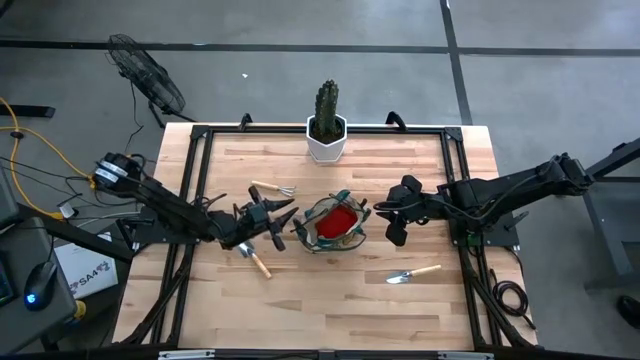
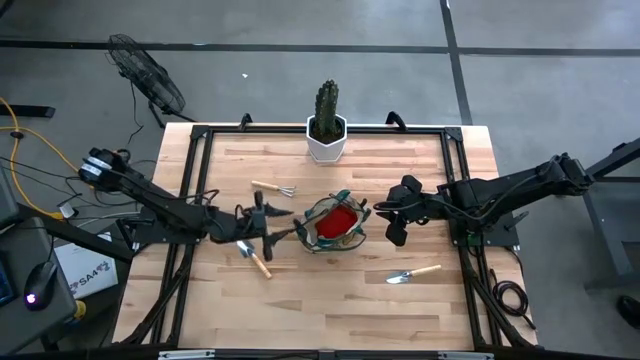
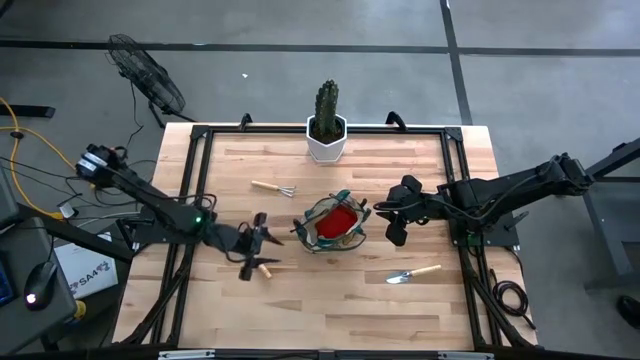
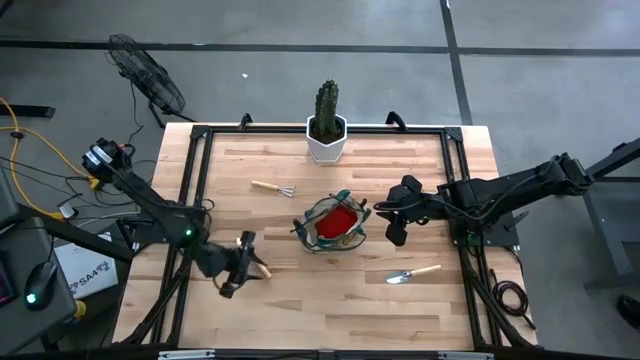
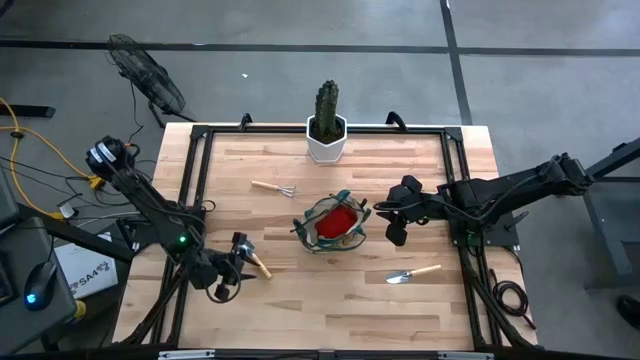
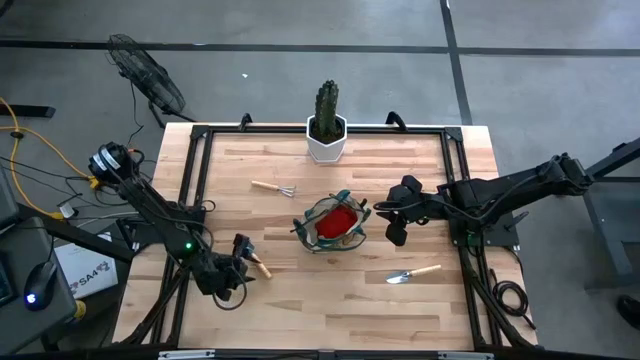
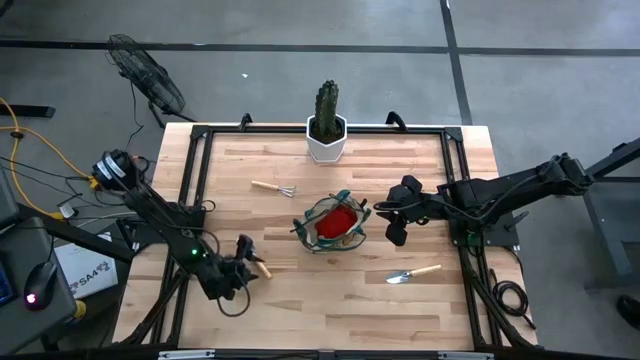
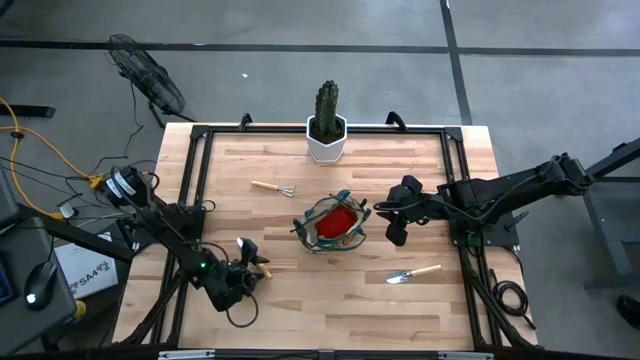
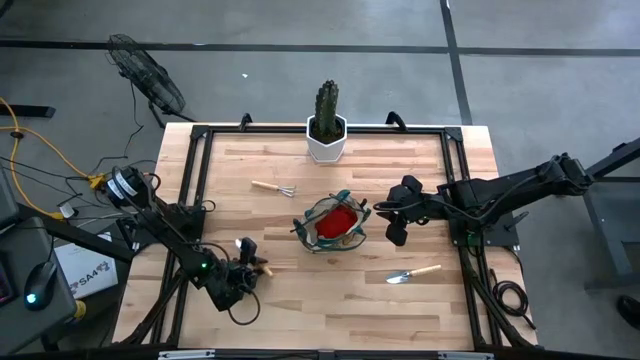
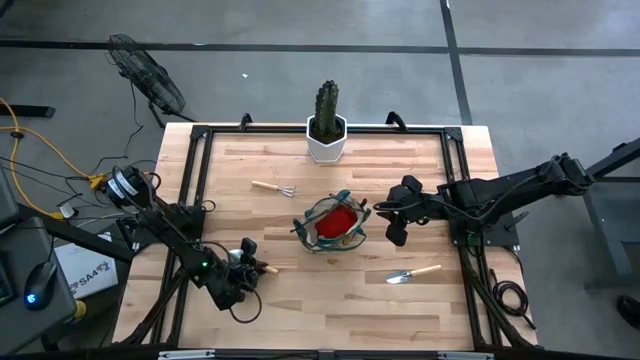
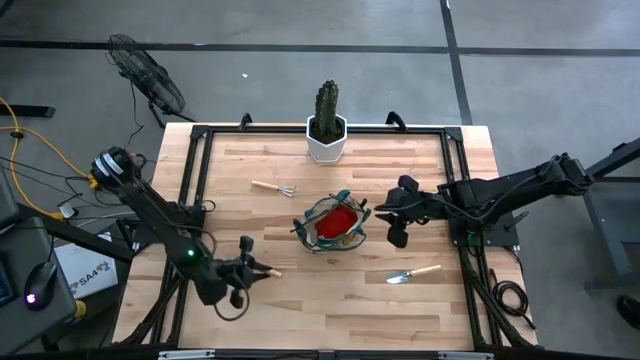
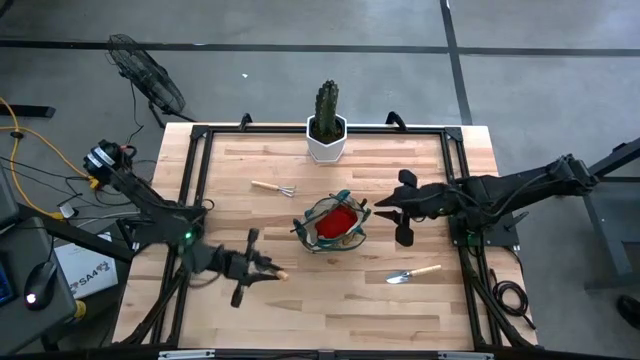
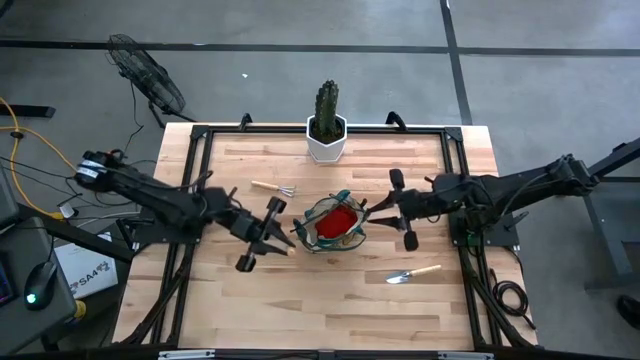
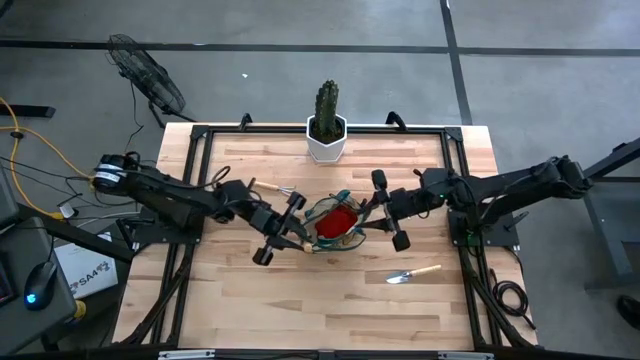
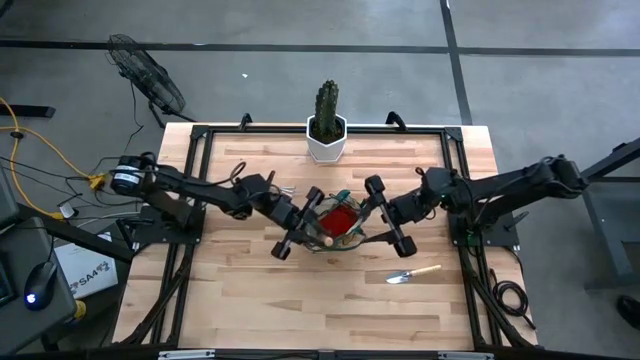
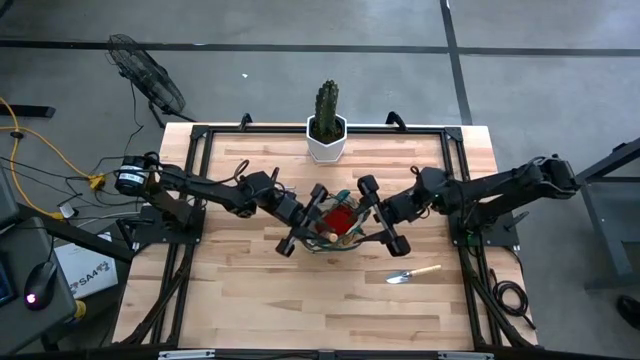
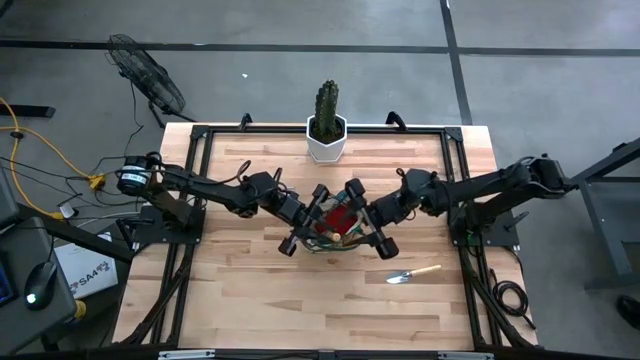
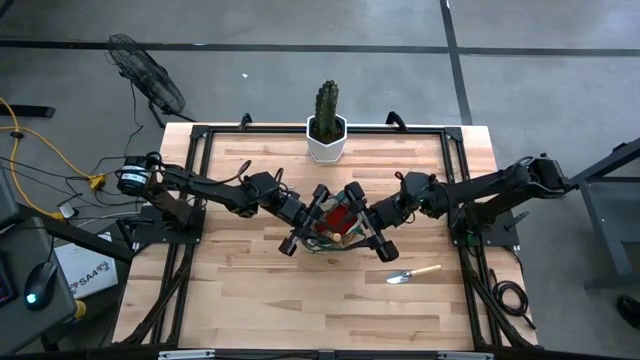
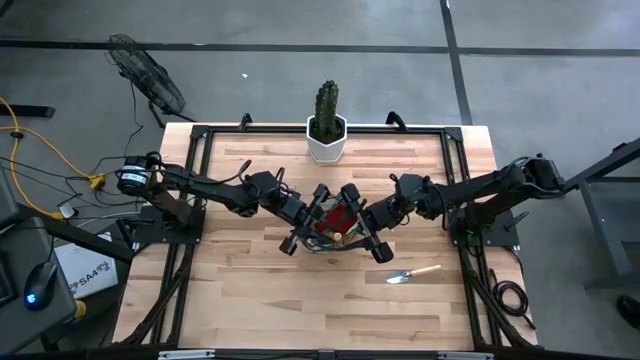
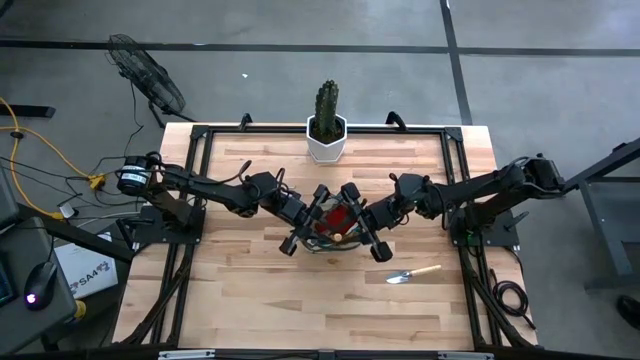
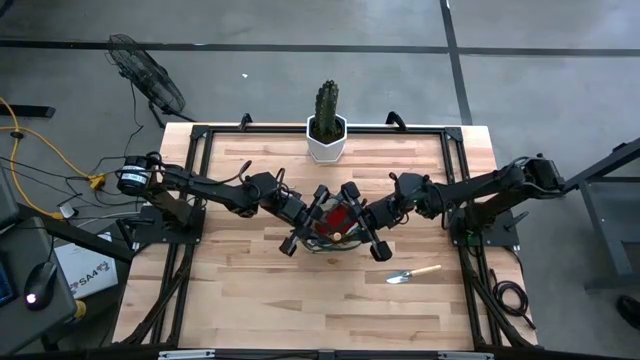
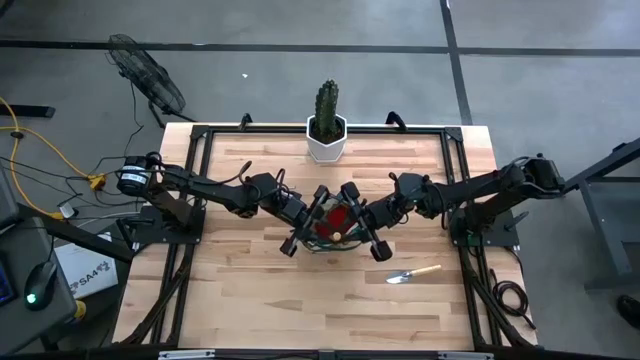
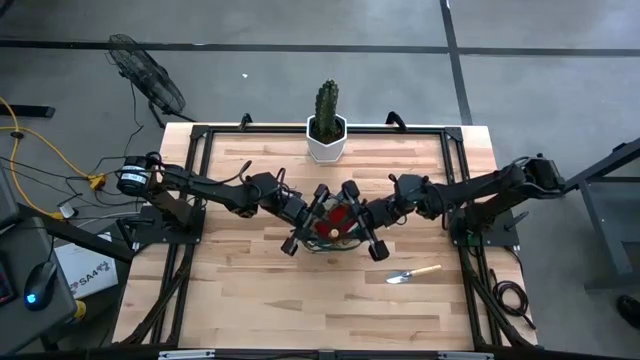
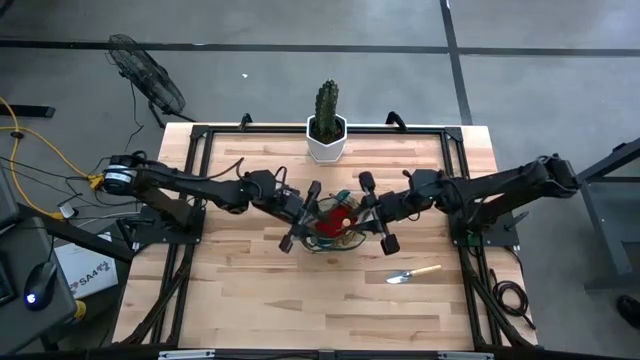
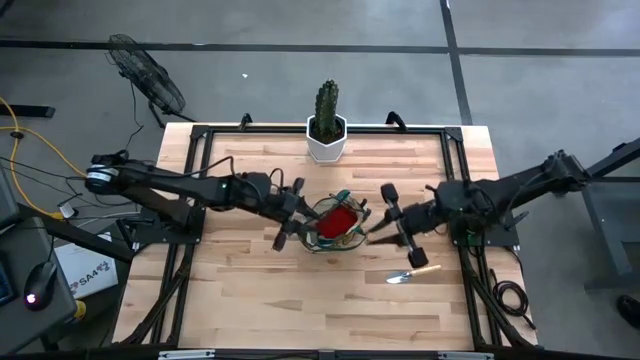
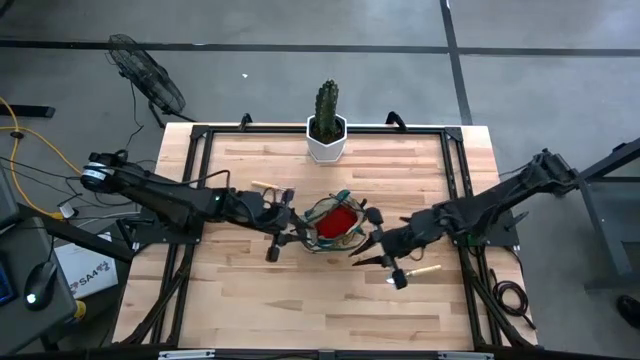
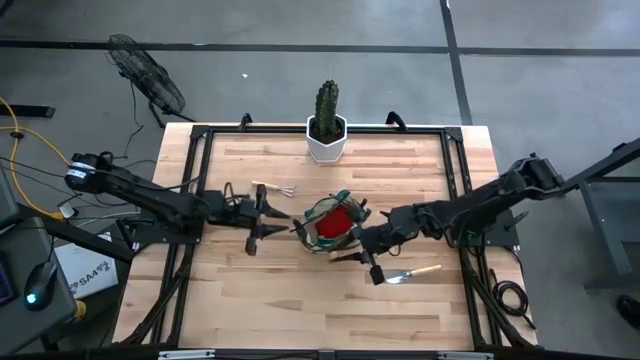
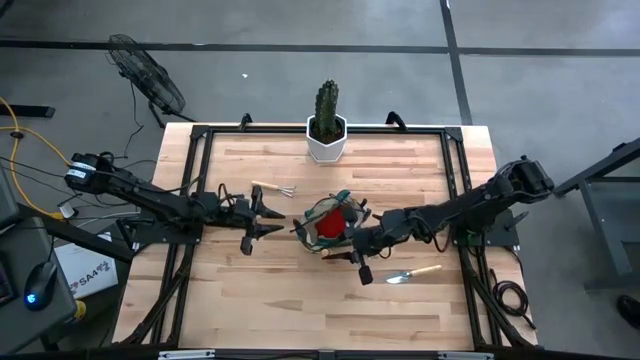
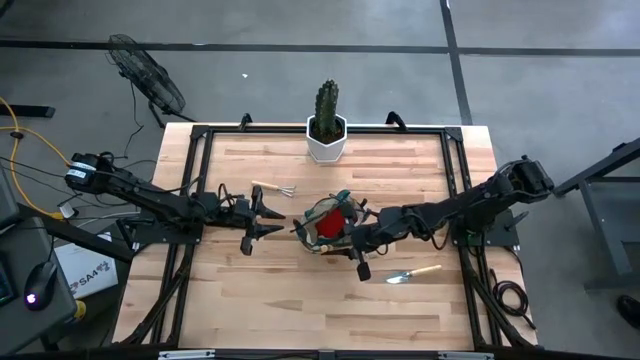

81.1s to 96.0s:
Task: Pick & Place Garden tools in Gardening bag
Put the brown trowel into the brown gardening bag

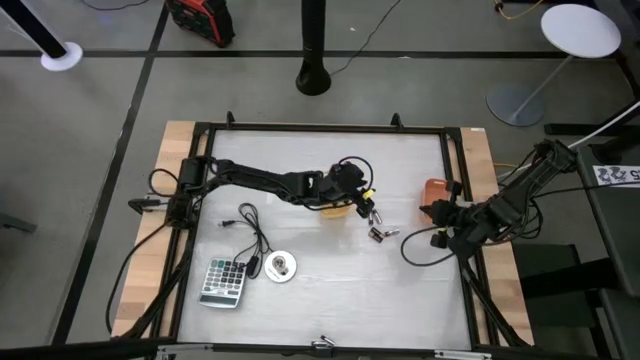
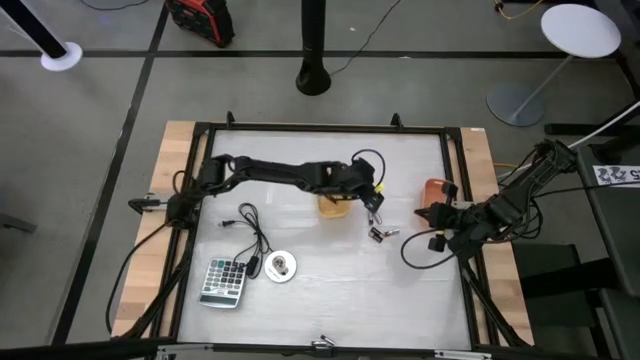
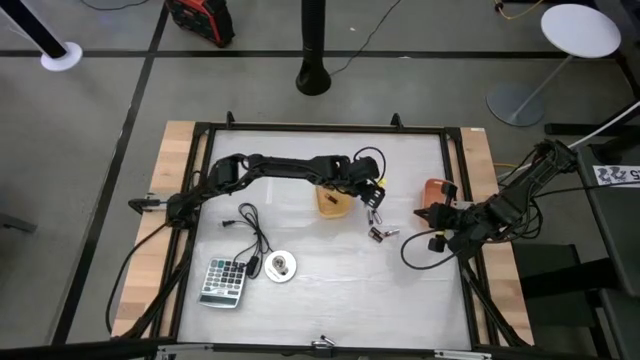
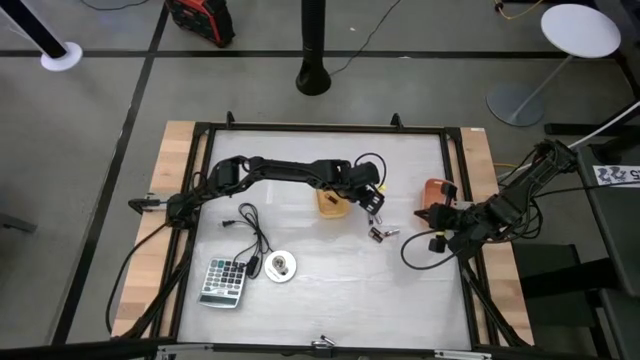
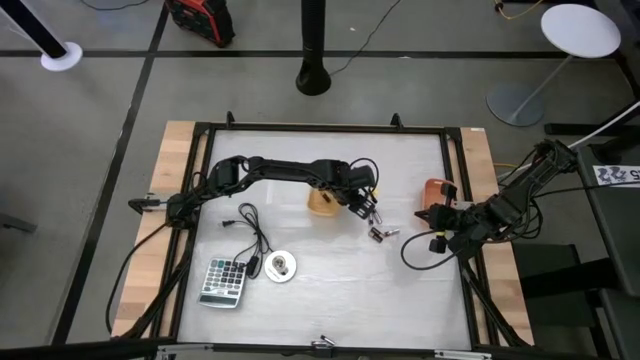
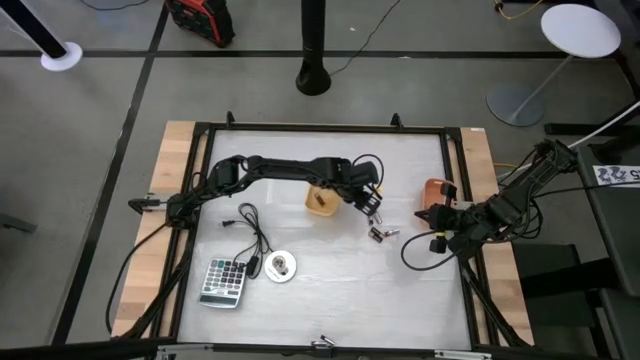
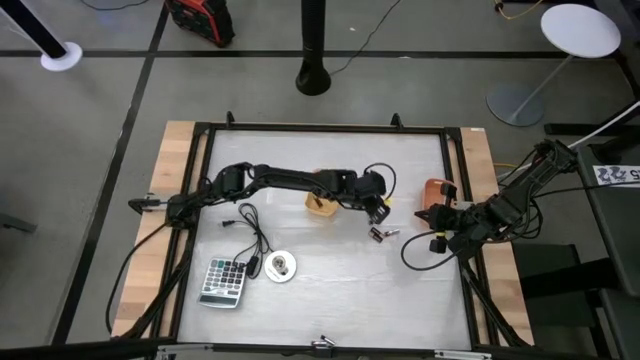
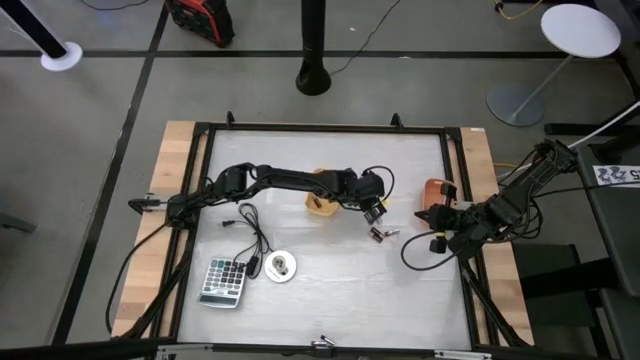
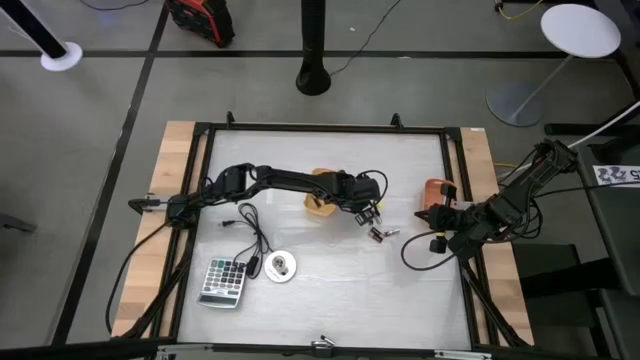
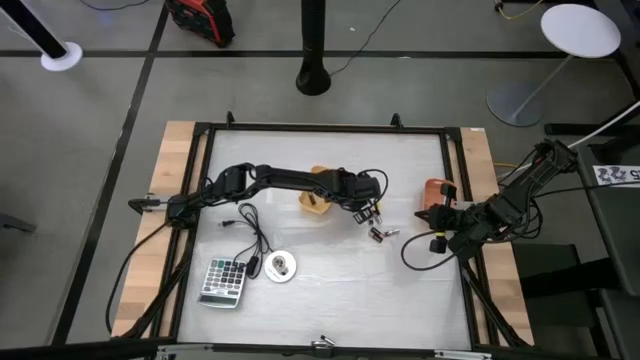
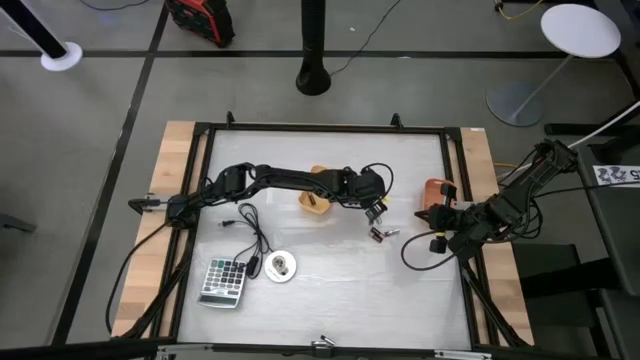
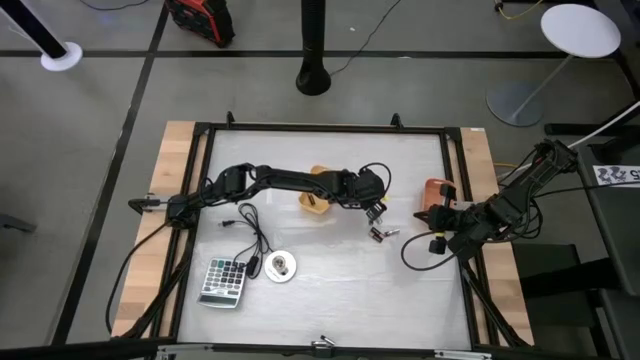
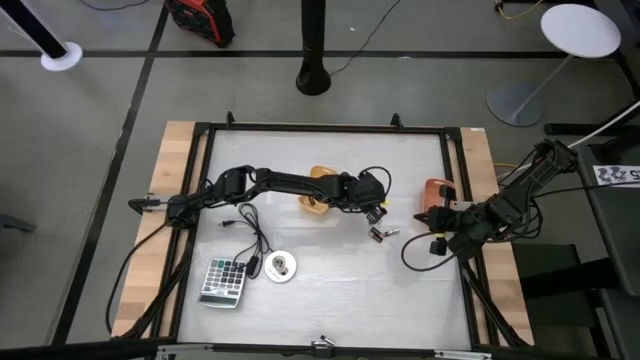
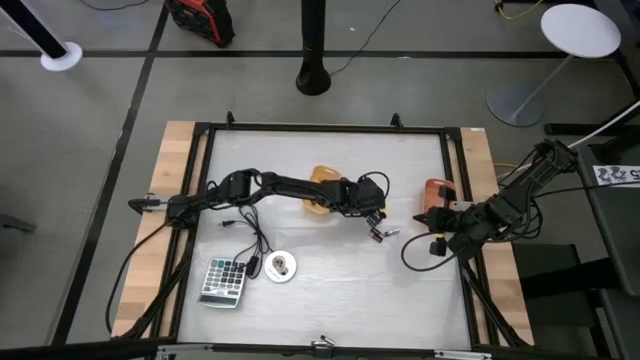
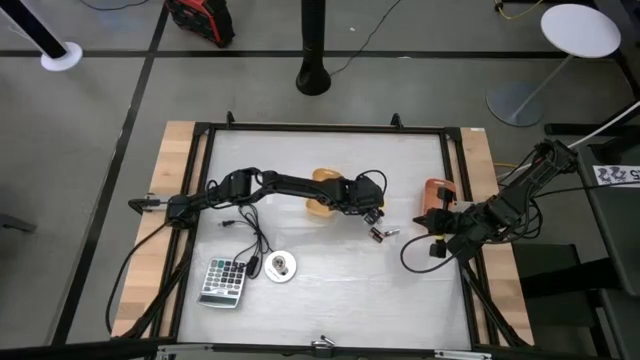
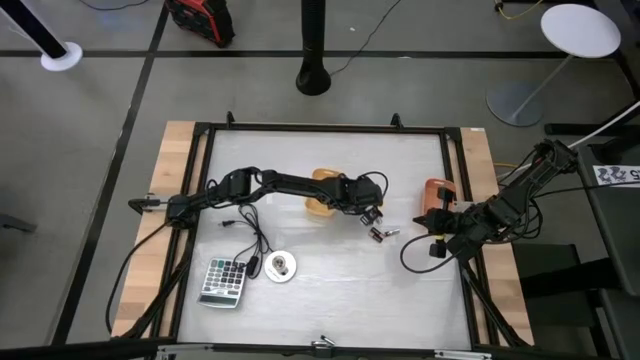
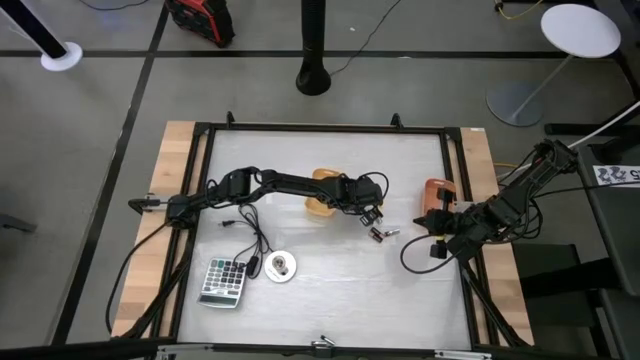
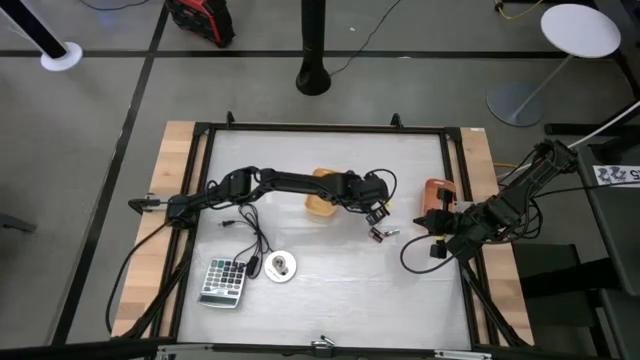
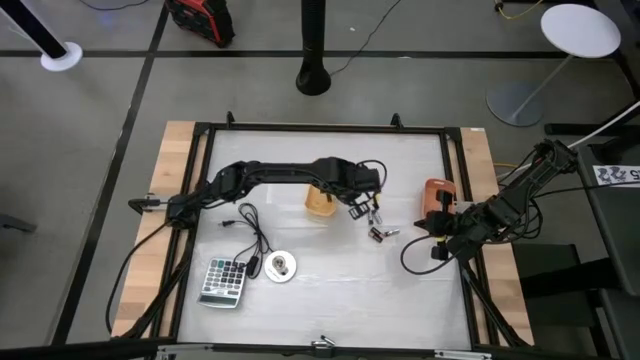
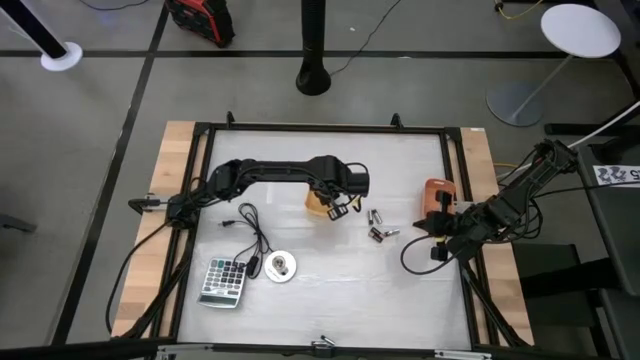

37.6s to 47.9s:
Task: Sort batteries
Put the black battery into the yellow bin
